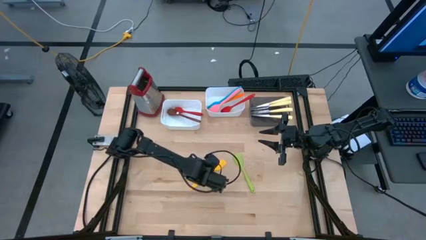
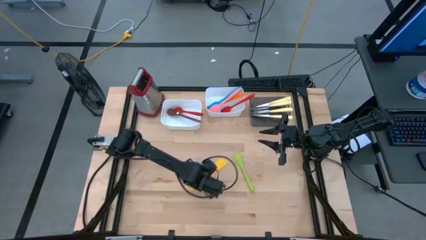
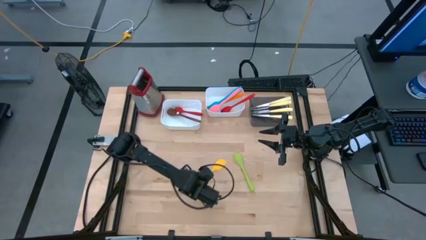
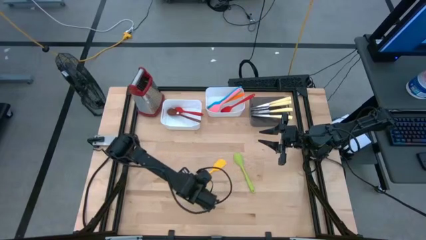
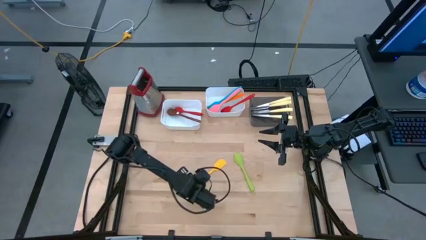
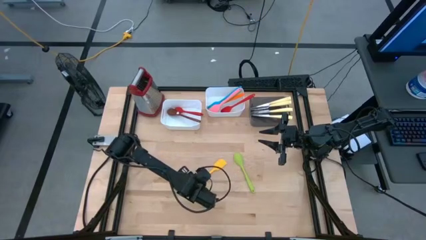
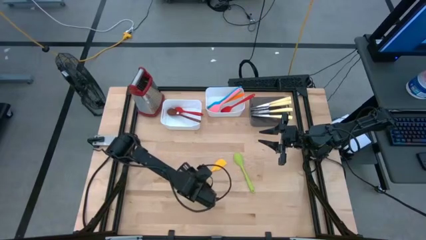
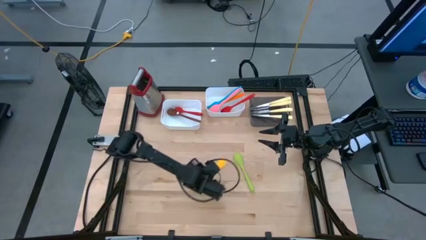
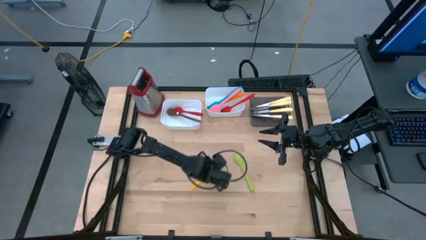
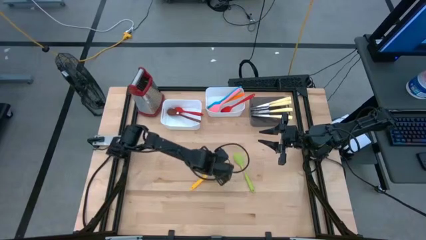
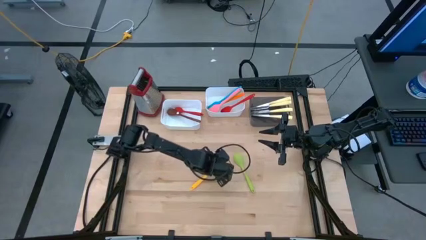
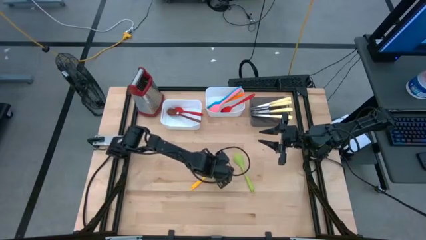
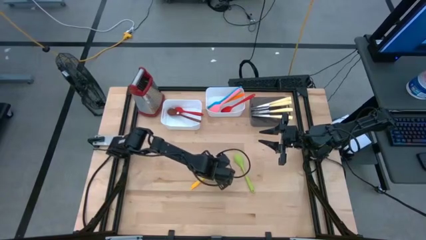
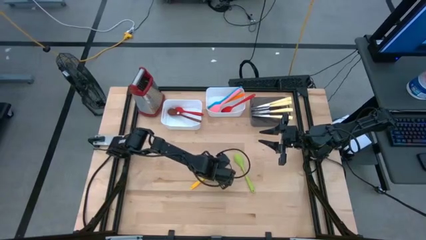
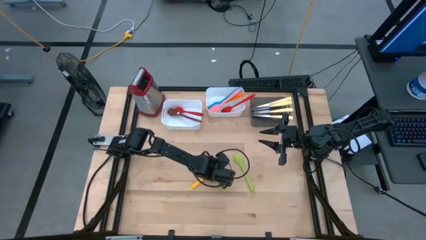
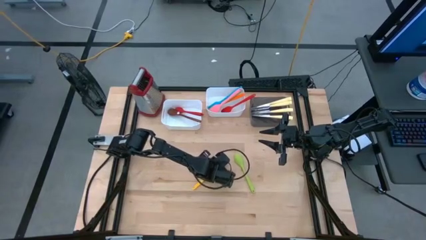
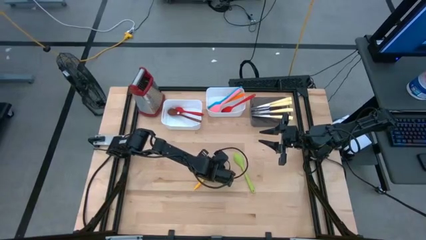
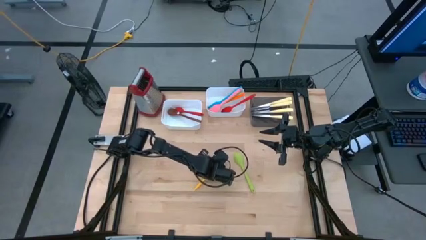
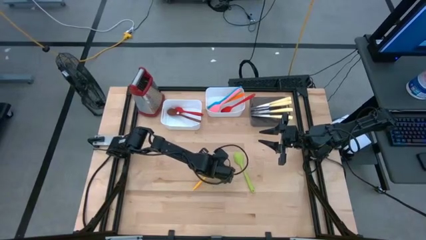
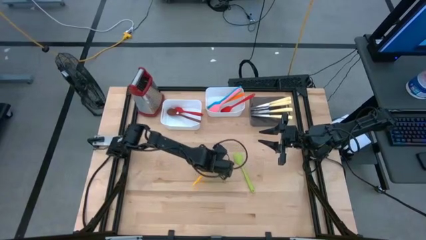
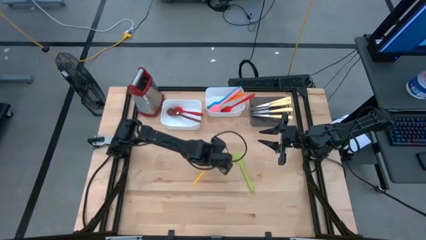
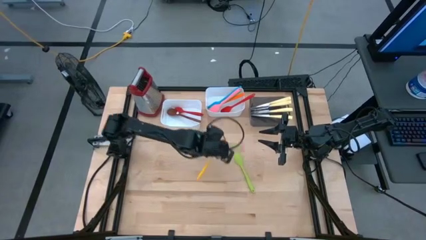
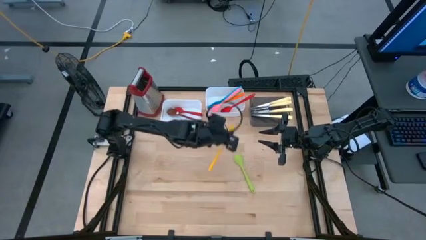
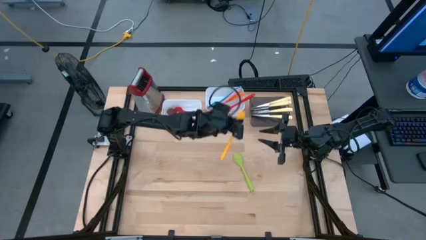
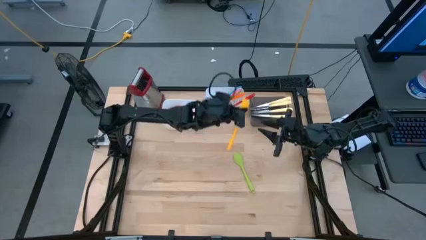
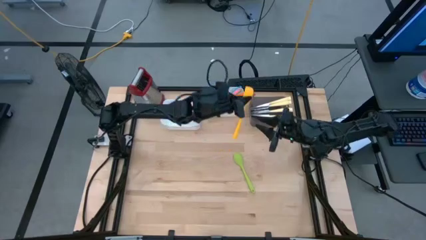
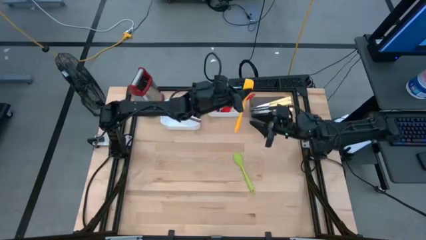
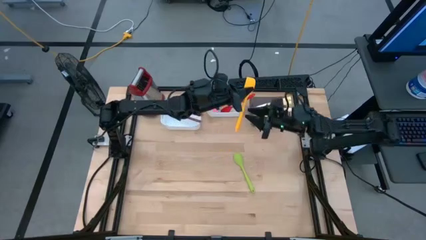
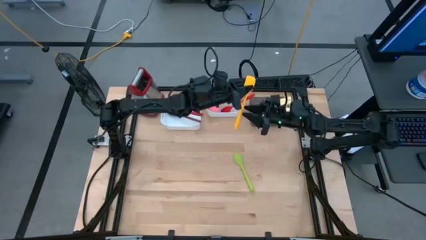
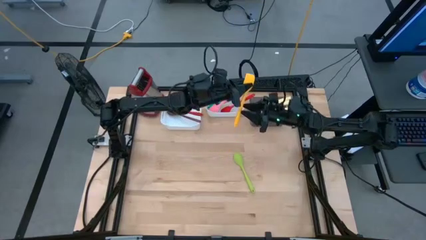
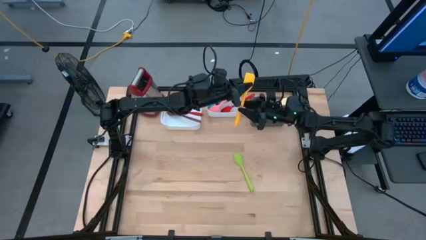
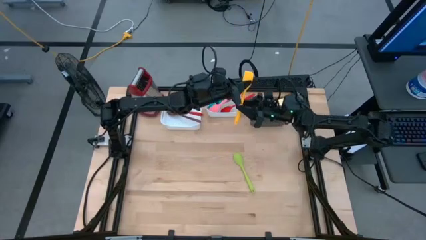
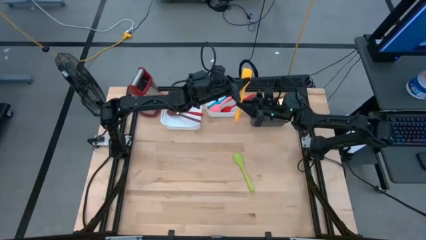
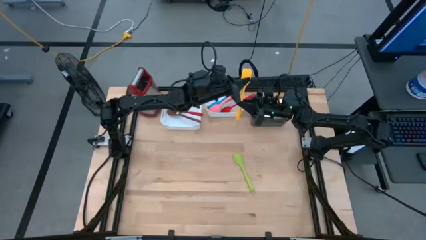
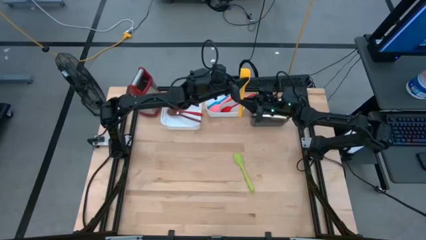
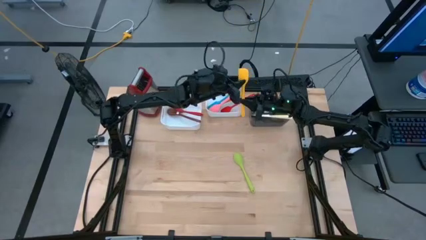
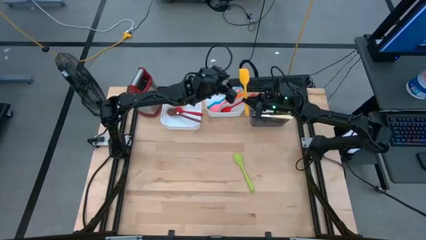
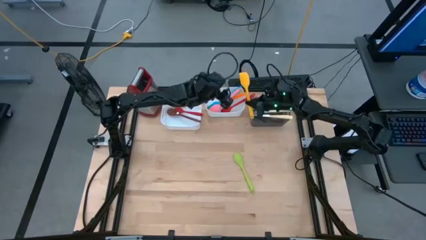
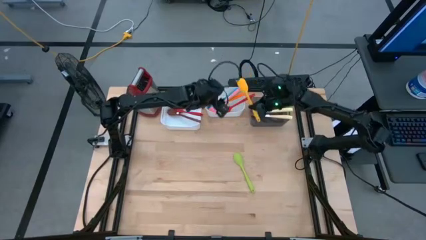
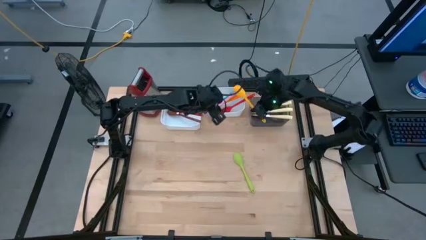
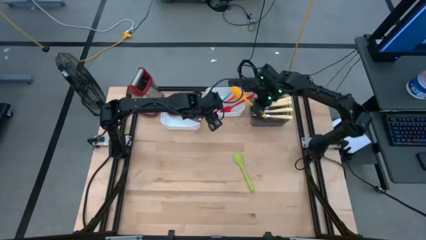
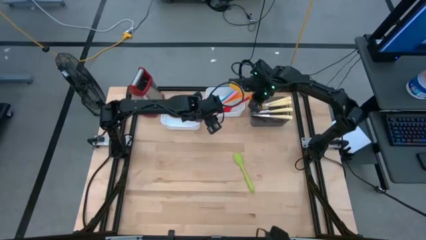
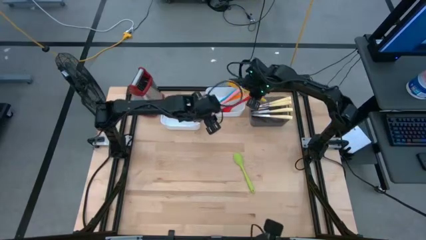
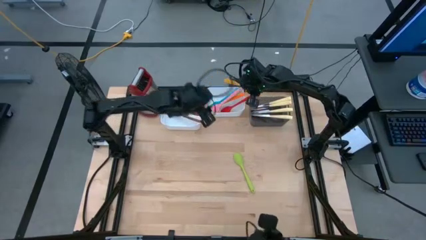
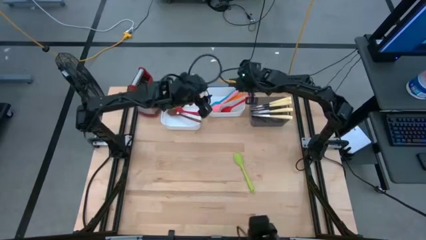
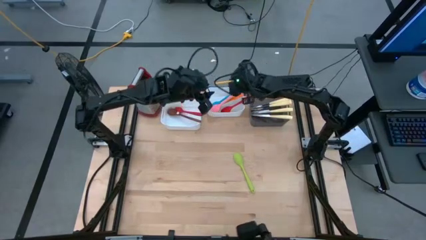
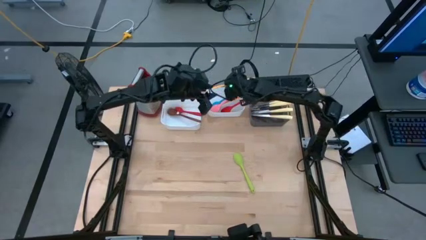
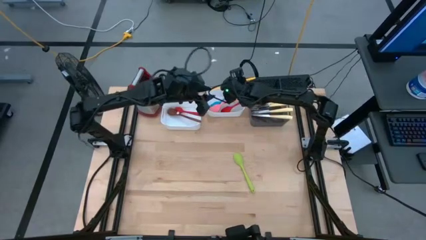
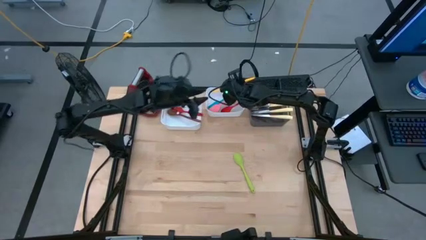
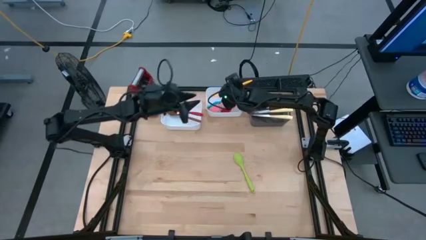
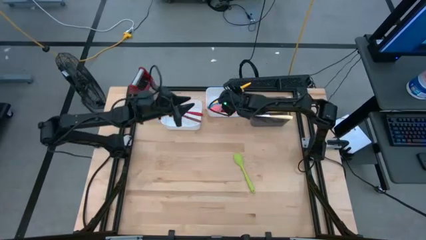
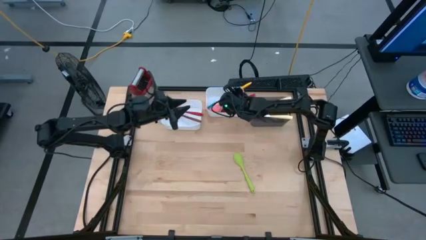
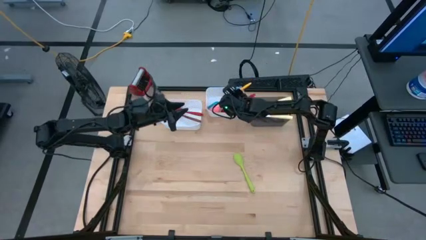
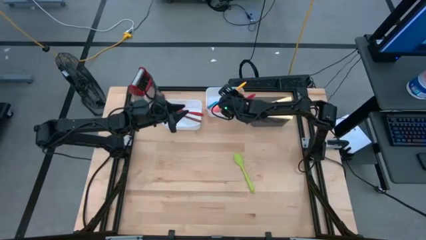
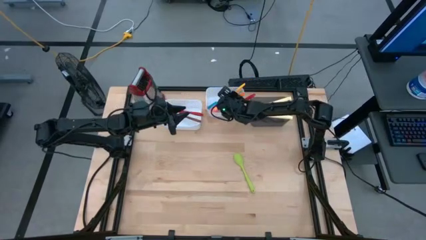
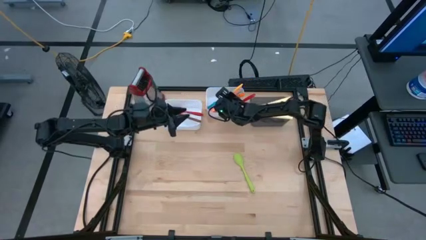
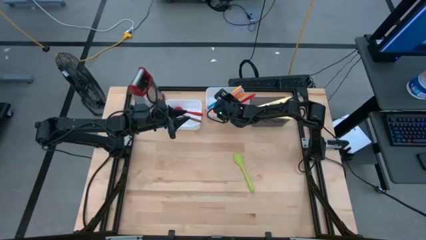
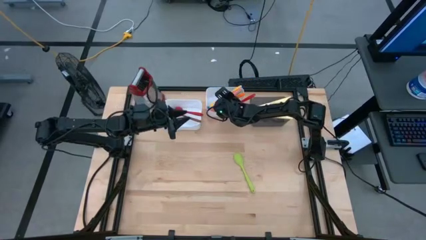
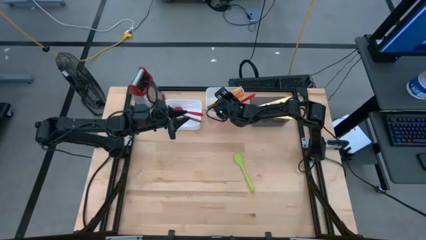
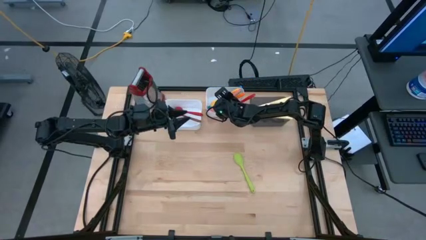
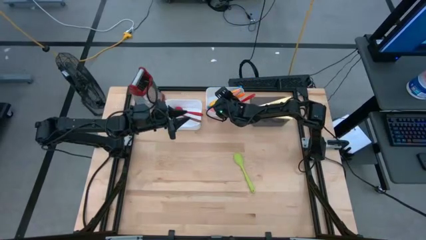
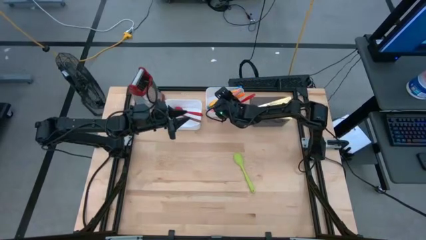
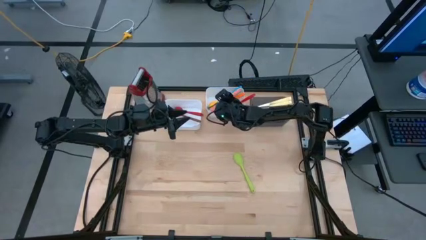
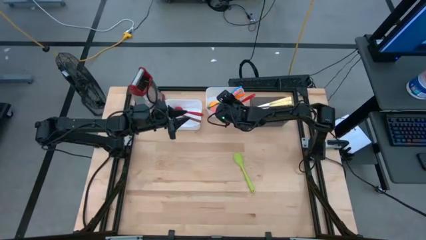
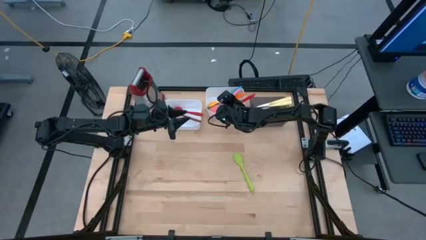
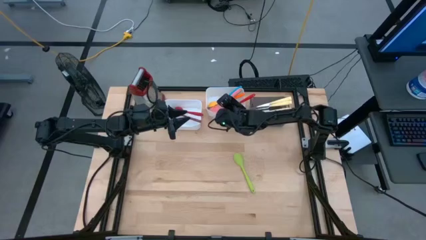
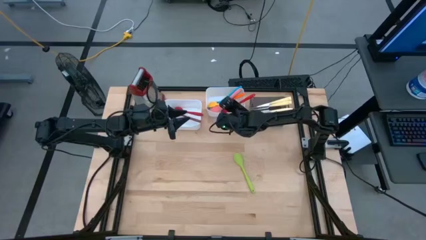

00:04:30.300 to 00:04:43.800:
Task: Pick & Place Kitchen Items
Put the yellow spatula into the right white bin
